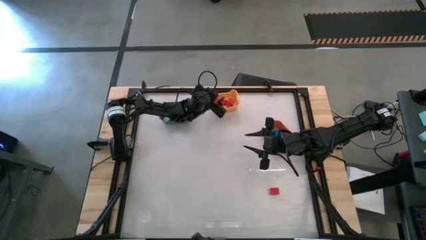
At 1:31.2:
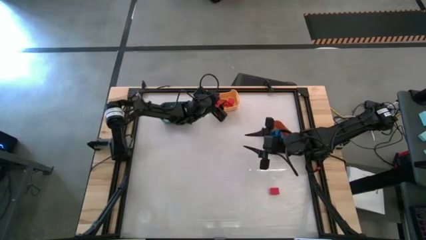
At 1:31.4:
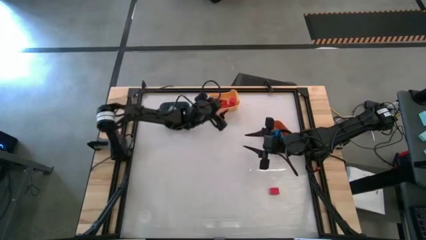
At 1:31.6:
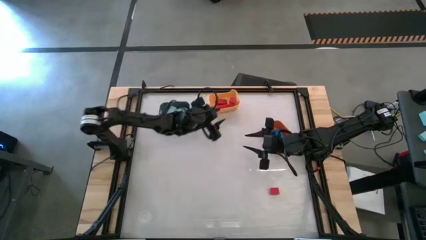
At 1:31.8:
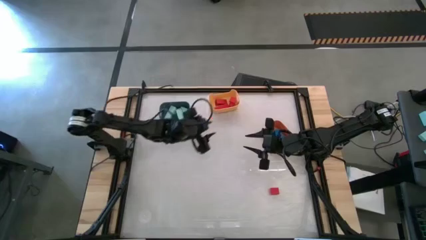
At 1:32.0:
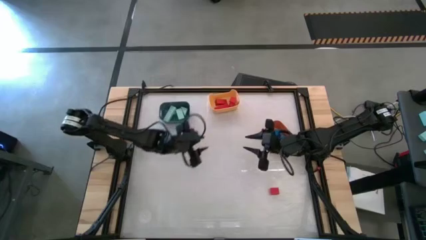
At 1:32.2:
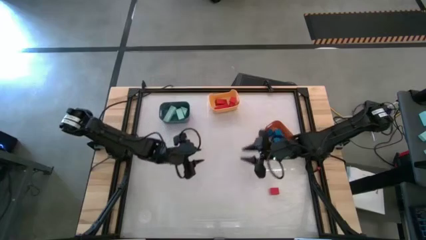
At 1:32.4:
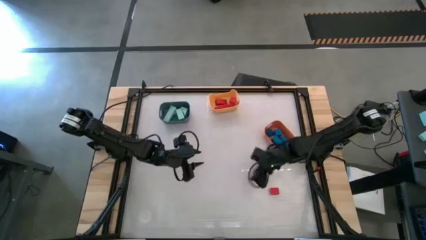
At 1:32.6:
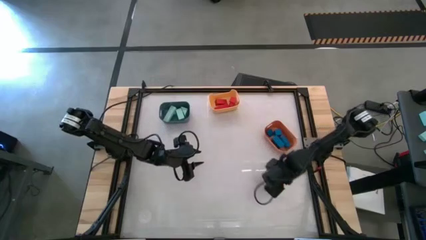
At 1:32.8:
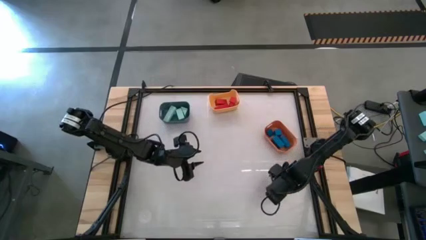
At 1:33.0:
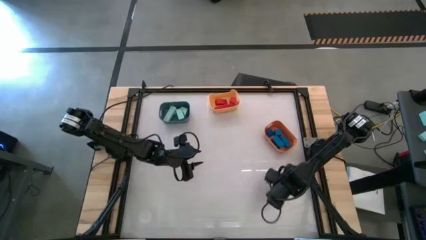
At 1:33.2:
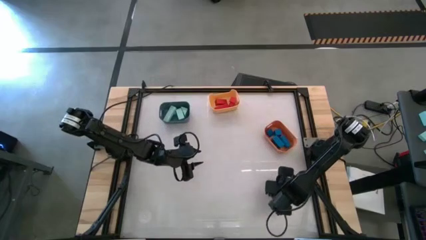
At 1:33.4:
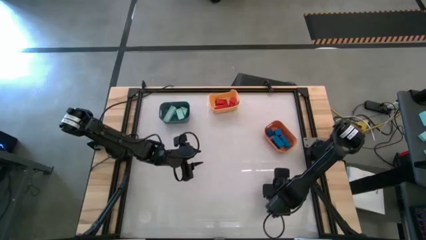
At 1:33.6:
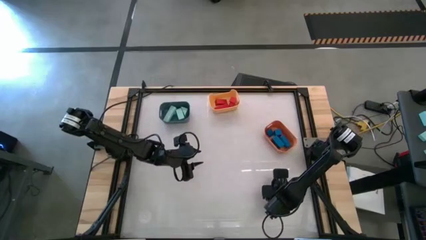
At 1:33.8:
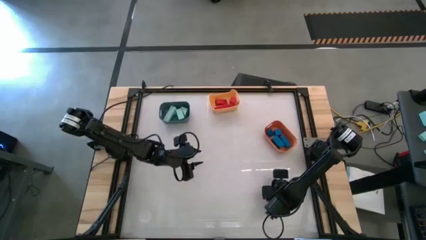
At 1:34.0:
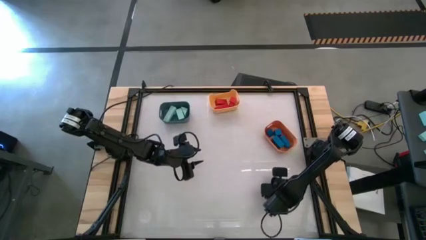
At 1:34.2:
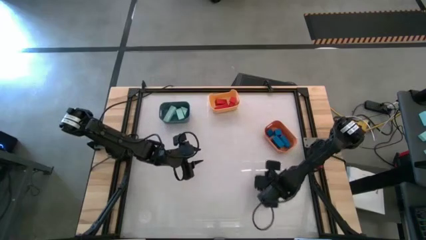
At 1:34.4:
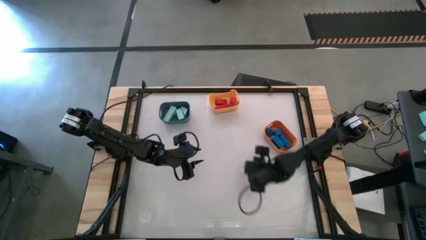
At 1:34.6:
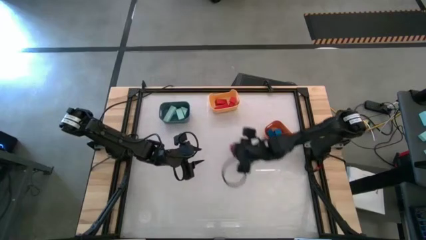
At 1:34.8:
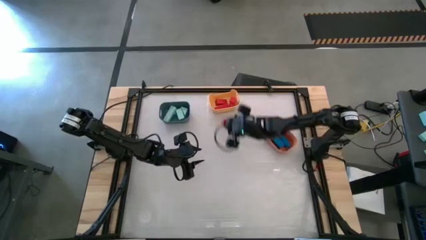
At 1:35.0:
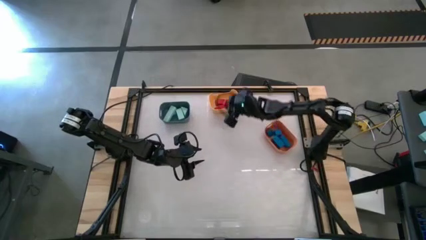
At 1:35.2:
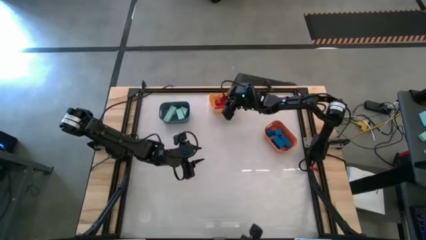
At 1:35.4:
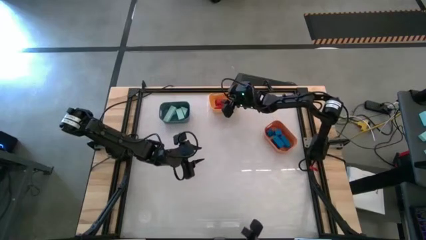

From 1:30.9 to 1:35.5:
Task: Sort & place blocks by color
Put the orange block into the yellow bin

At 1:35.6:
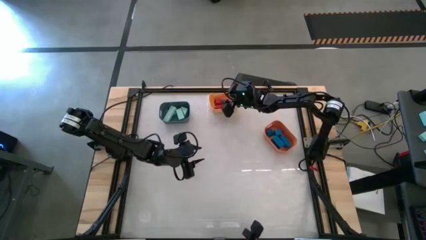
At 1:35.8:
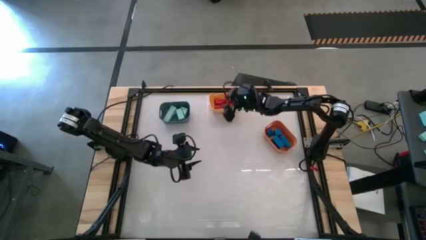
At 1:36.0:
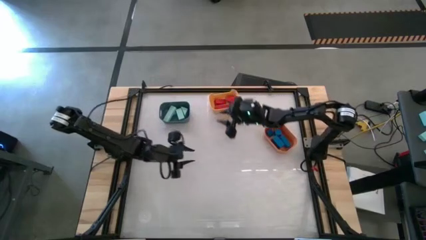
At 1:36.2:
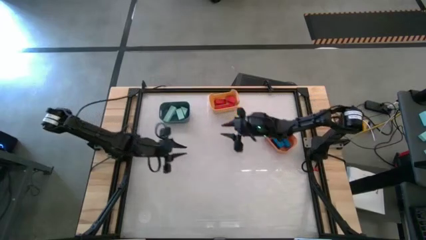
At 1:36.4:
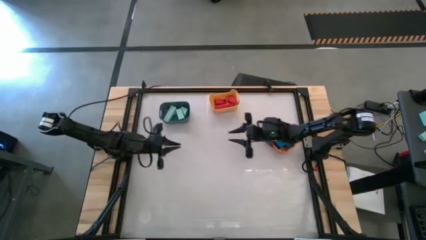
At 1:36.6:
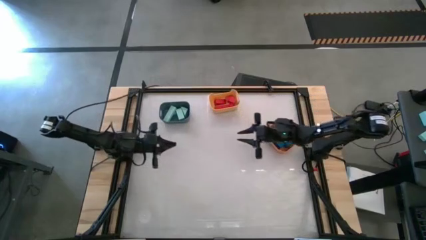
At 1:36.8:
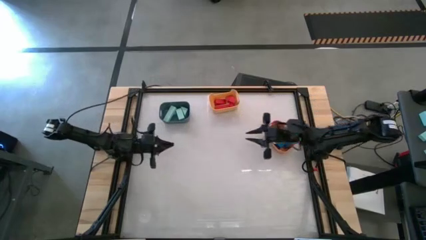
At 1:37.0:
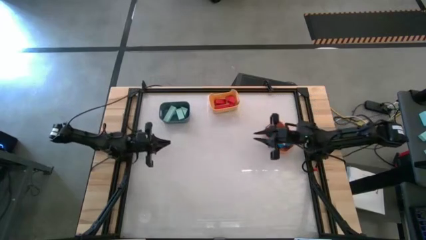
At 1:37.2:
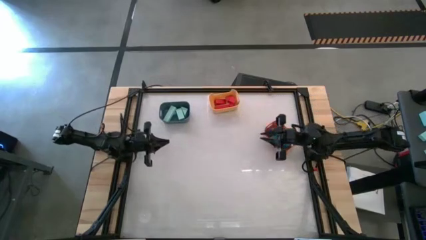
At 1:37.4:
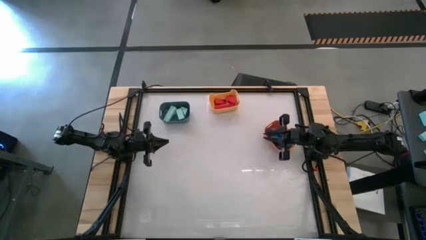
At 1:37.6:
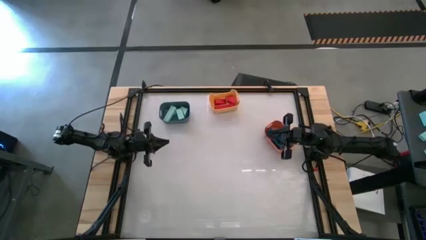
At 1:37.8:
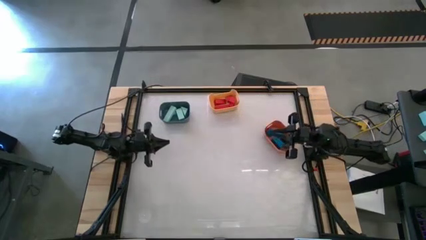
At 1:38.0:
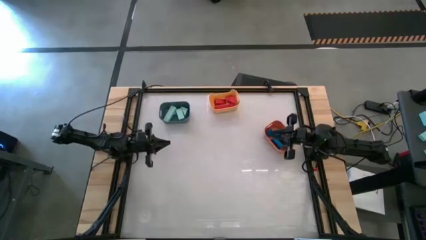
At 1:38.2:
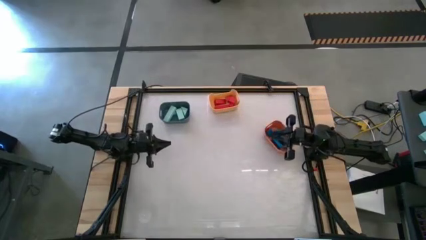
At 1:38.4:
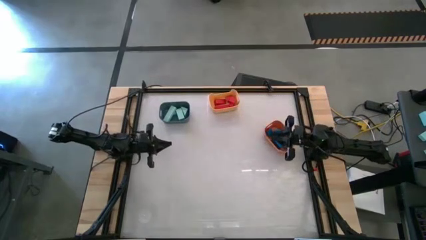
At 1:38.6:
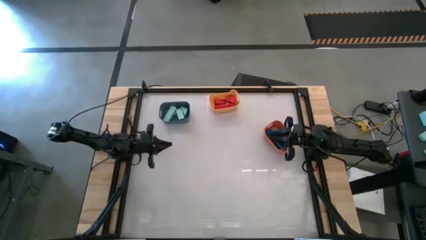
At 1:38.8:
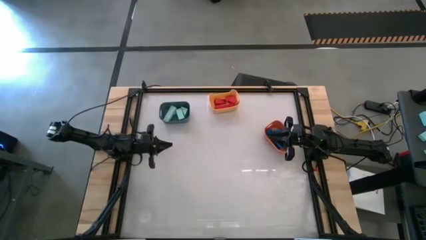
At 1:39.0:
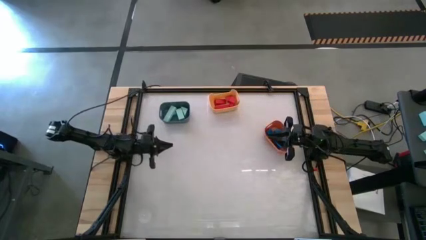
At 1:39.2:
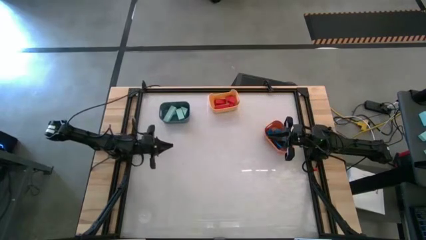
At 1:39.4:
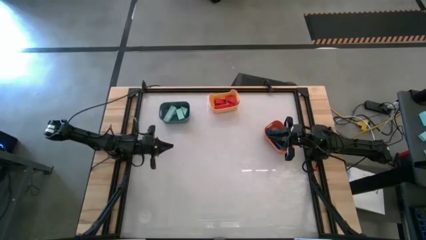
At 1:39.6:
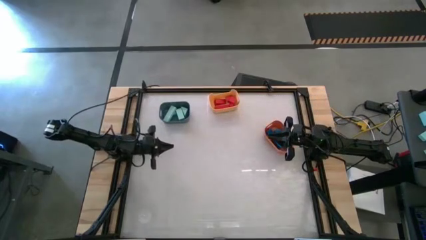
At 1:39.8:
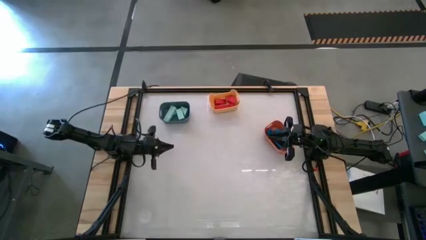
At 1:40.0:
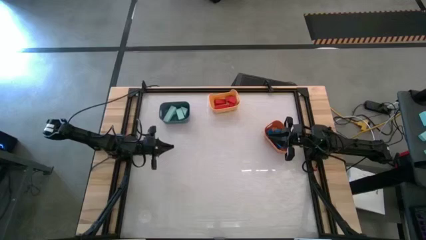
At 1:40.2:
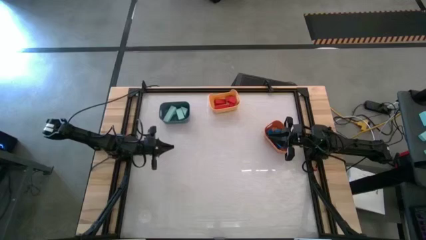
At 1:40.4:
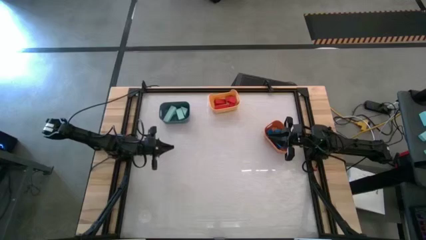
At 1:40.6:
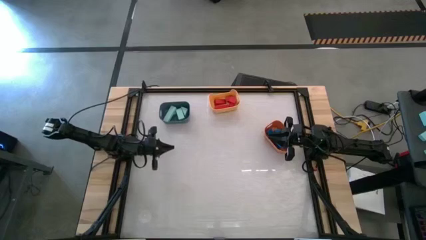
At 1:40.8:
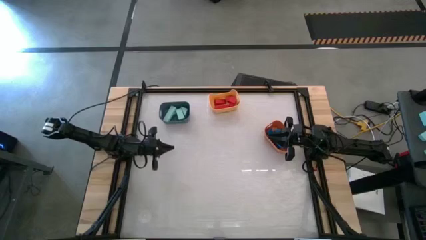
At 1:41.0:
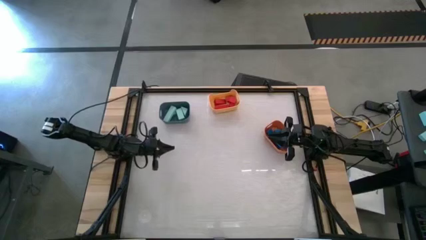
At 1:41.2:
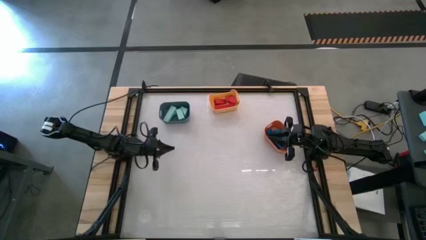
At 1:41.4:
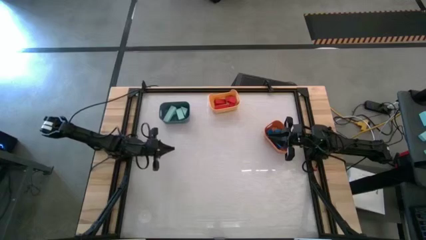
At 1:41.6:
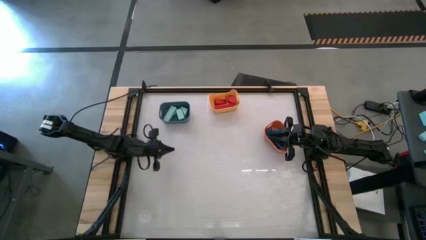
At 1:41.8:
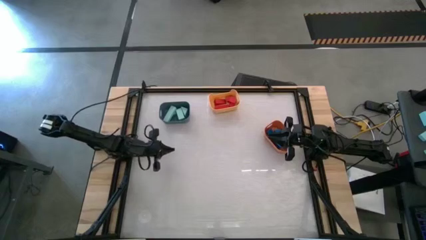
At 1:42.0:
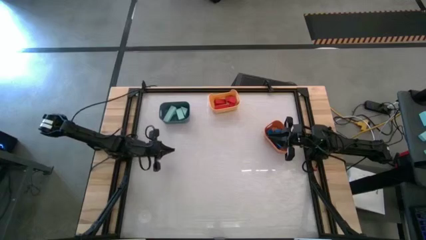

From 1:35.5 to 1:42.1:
Return to Home Position

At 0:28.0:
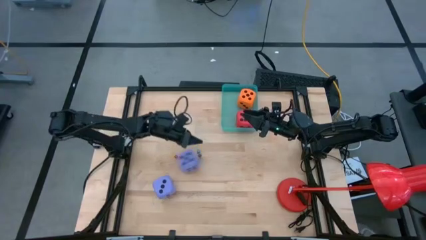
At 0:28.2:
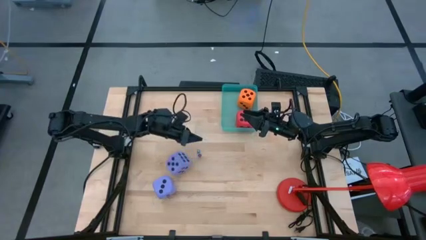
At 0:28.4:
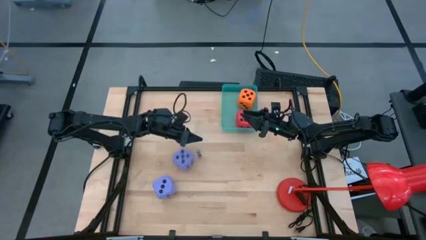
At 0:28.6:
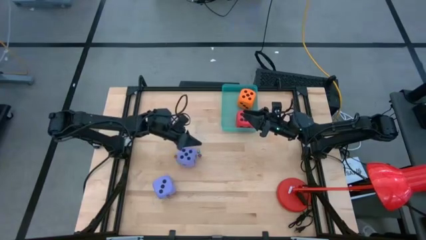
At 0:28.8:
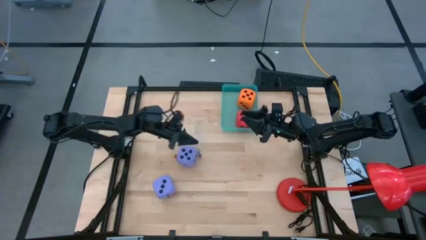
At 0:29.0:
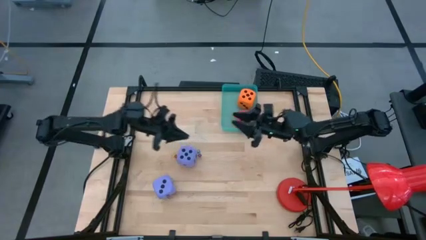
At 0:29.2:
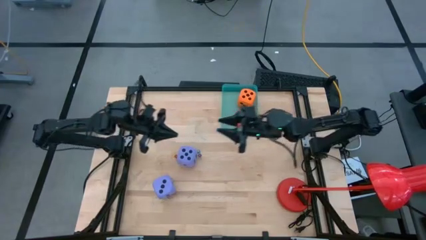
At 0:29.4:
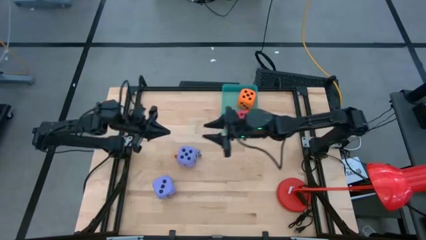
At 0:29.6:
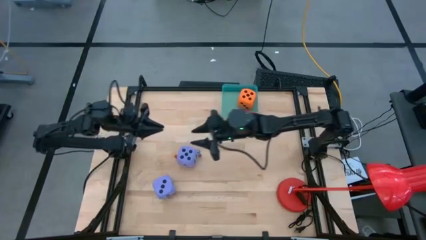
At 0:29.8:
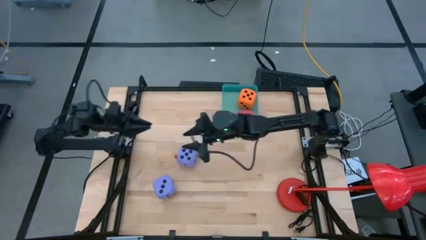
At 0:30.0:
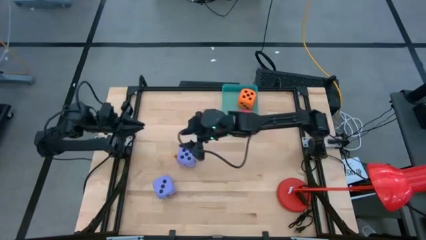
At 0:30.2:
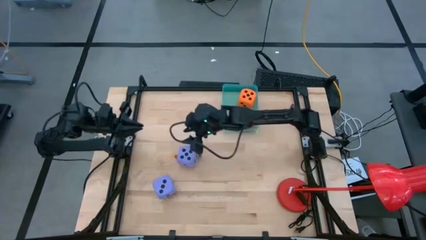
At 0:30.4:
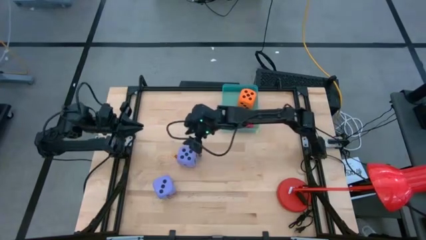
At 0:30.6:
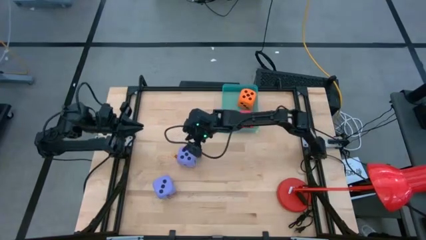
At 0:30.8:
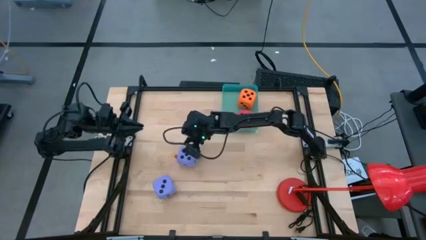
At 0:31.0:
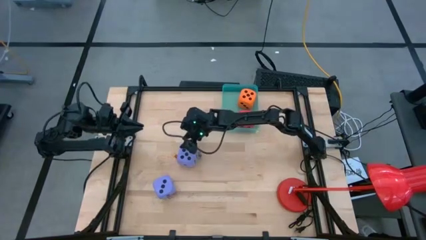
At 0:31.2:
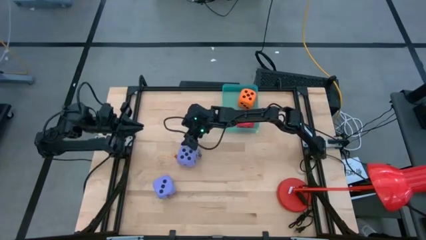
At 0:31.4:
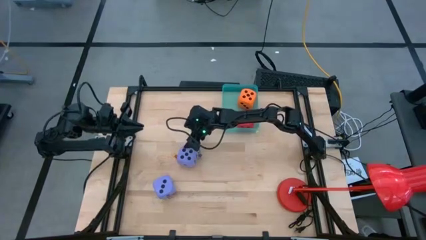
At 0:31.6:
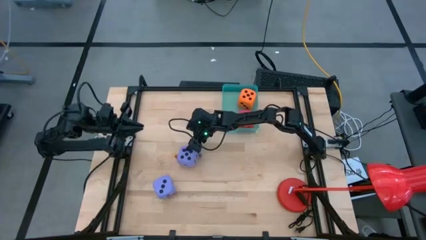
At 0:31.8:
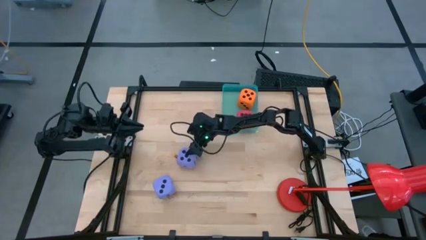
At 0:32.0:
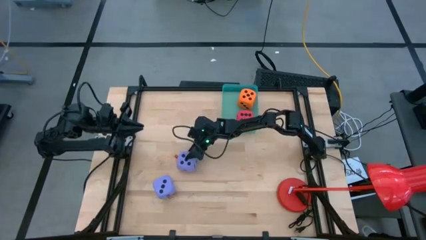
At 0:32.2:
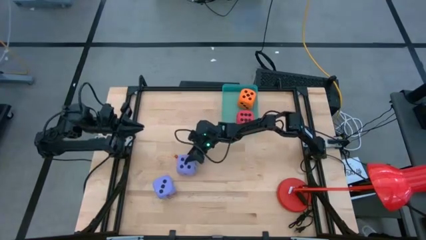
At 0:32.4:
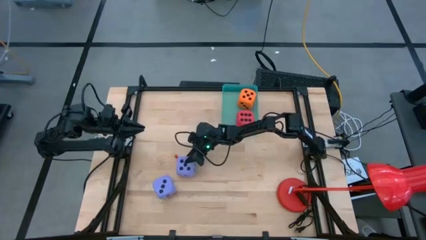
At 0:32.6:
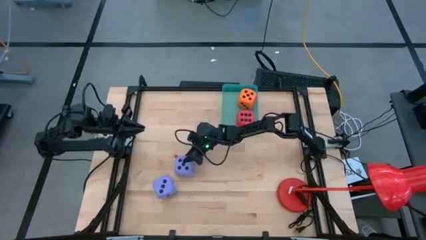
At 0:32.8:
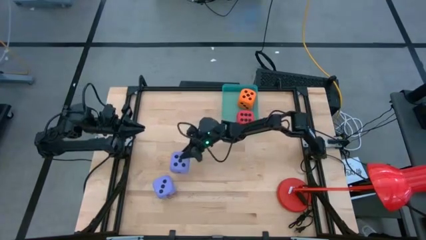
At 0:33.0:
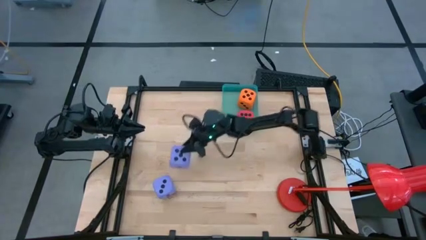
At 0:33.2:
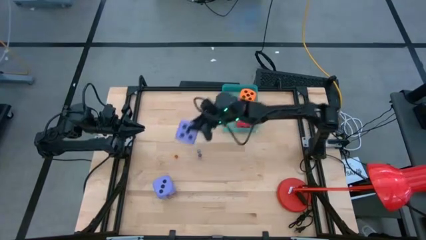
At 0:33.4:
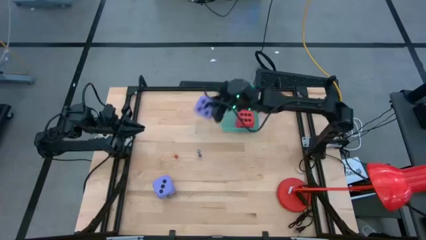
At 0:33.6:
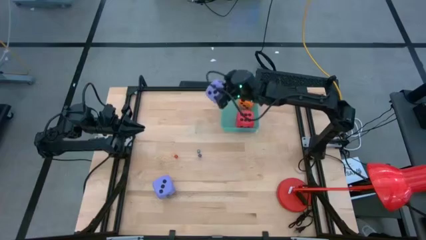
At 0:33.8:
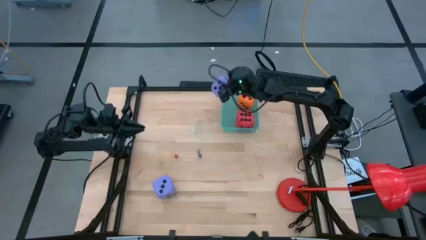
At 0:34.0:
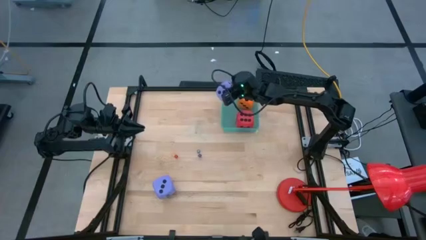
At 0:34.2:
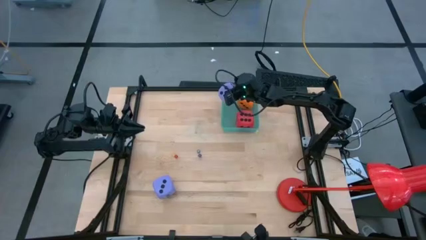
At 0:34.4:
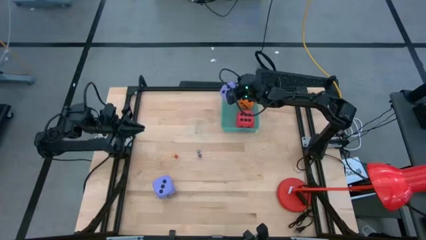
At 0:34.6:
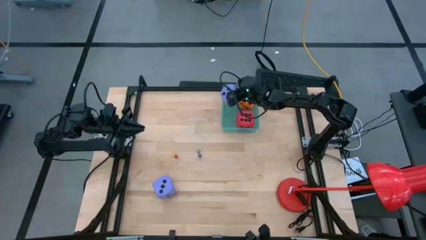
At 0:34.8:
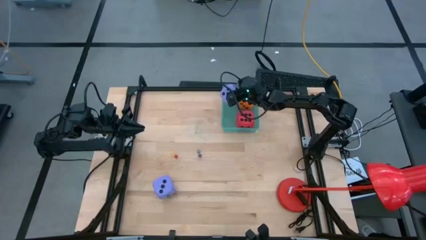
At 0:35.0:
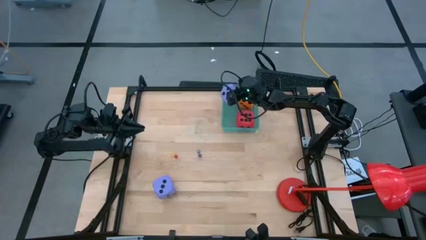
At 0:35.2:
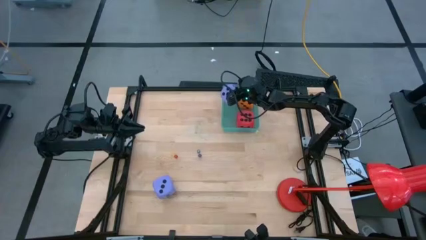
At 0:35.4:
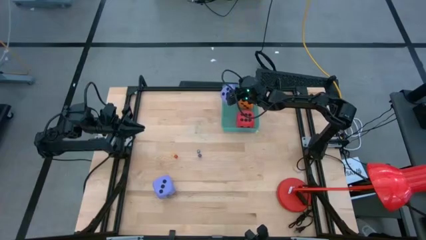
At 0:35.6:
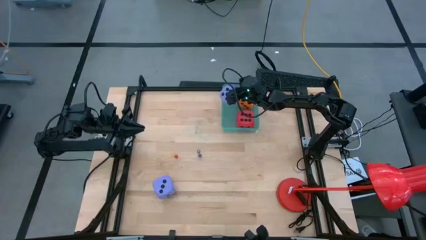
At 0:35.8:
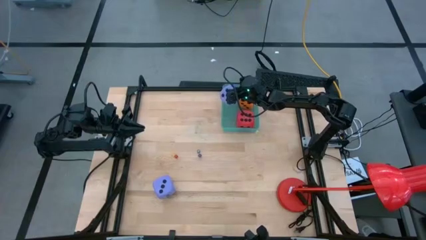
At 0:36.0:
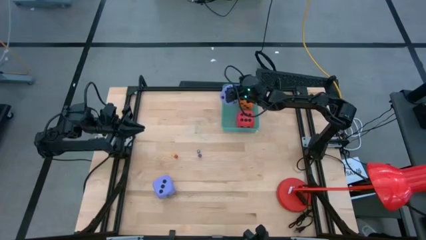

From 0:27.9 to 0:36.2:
Task: Pick & Place Dice
Put the large purple die into the green bin
